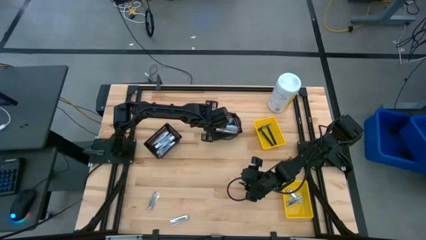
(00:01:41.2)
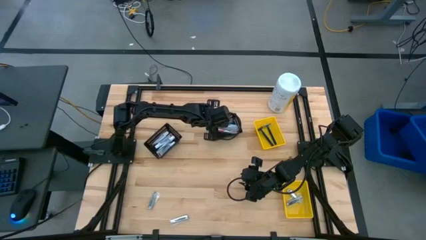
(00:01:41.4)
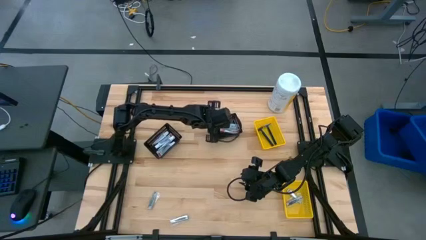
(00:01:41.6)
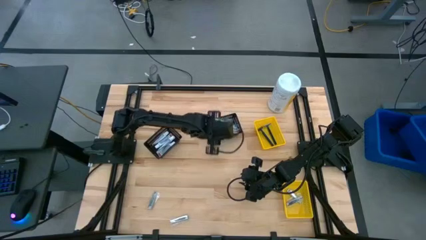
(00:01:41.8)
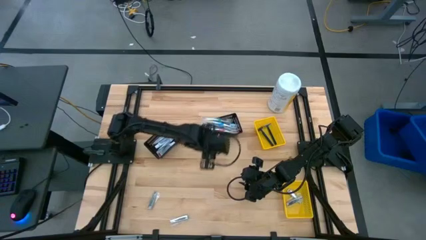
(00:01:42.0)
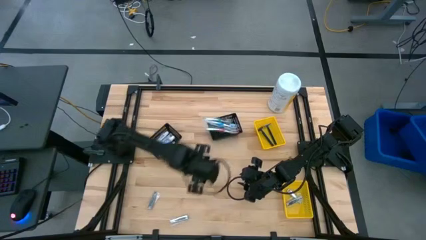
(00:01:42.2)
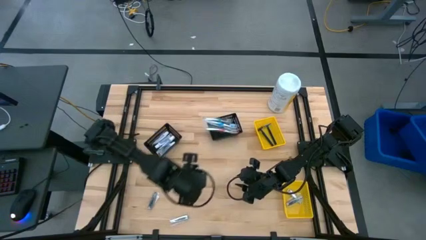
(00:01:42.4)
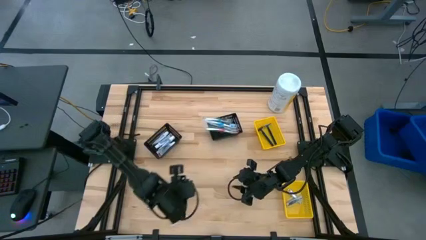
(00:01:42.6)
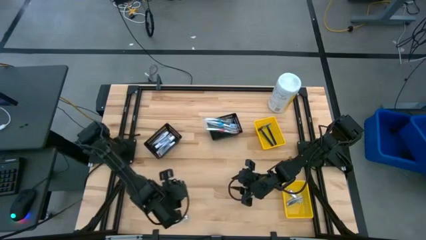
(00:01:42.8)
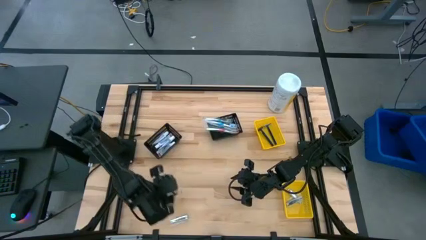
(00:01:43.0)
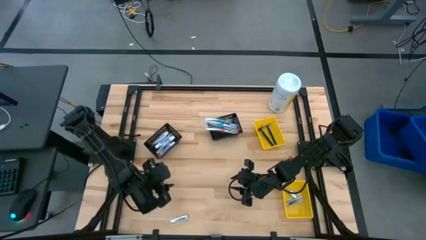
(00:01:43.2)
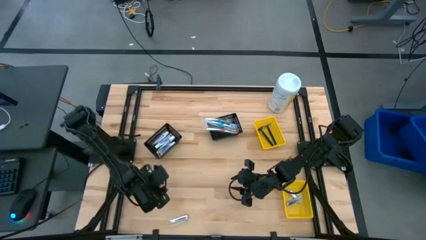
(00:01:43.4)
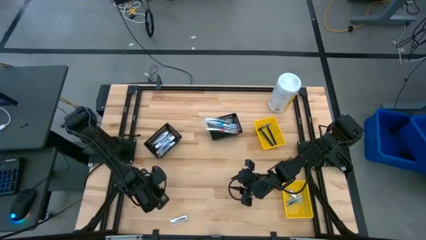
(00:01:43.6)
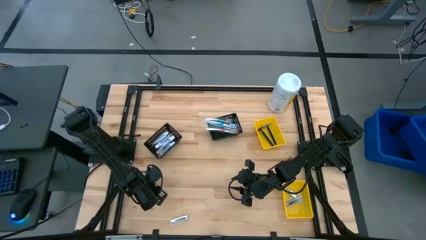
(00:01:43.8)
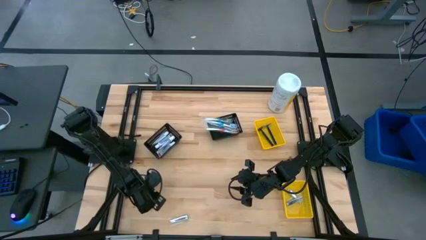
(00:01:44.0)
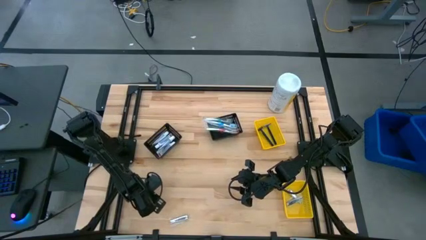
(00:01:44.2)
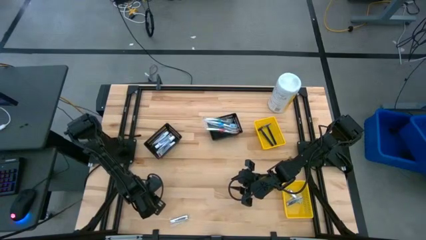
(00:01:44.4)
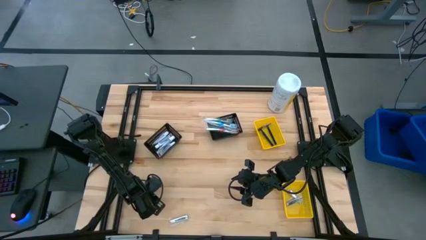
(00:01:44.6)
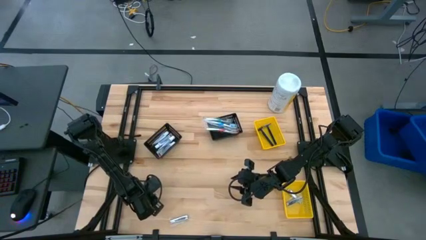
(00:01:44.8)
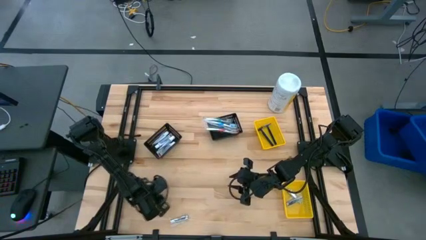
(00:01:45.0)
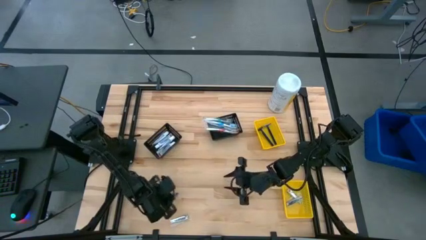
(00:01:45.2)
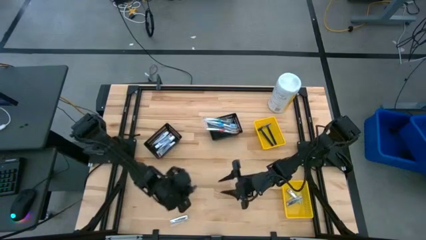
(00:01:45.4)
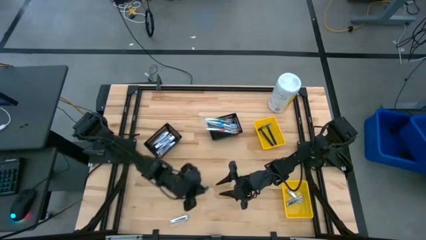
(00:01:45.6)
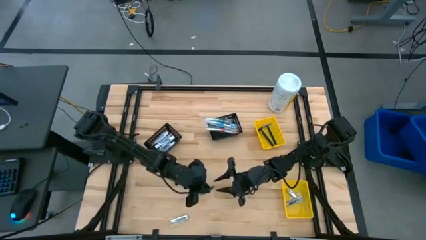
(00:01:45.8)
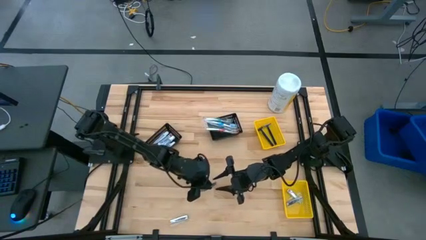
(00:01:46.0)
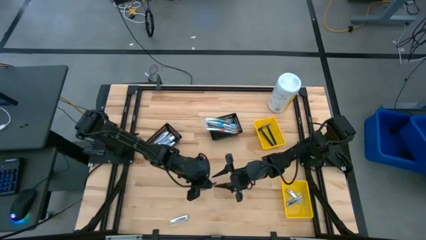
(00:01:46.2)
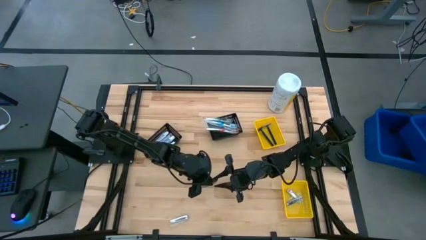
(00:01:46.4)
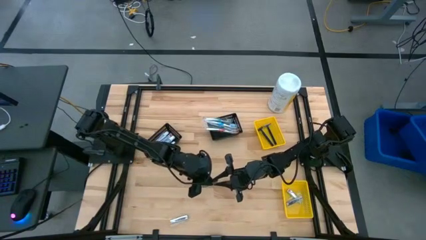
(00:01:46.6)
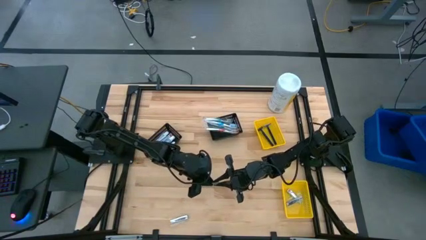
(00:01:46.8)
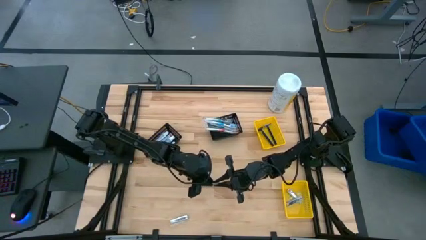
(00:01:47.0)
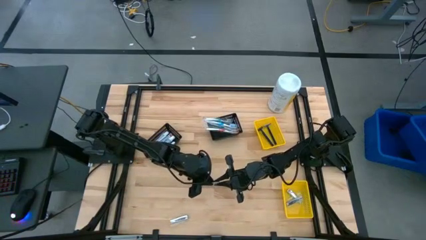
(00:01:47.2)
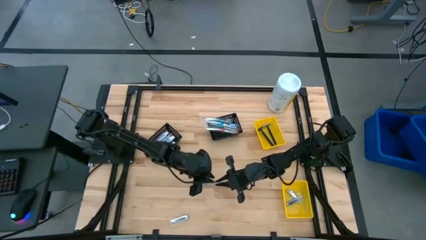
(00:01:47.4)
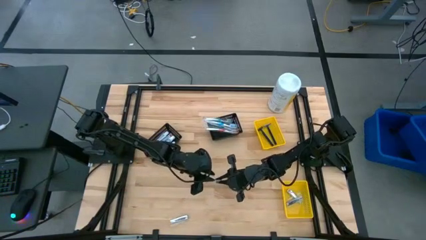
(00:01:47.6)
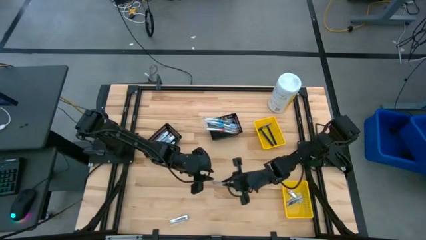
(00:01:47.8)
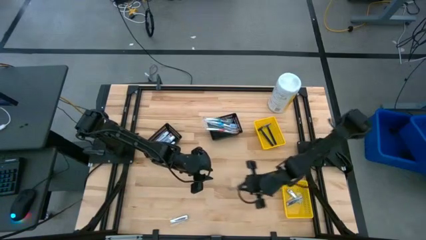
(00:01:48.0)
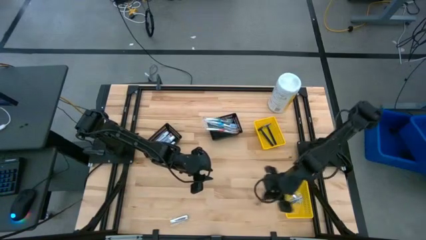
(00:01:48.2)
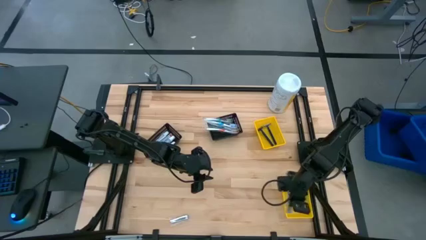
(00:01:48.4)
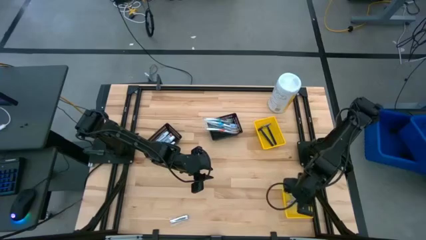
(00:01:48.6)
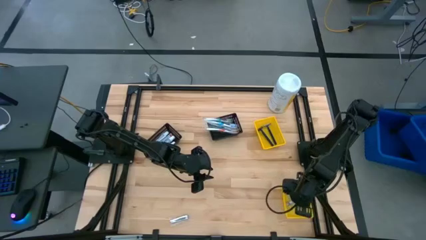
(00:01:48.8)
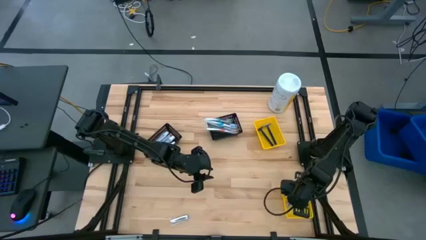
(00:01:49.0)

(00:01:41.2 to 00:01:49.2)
Task: Pick & Place Travel size toiletries
Put the silver nail cutter into the bottom yellow basket

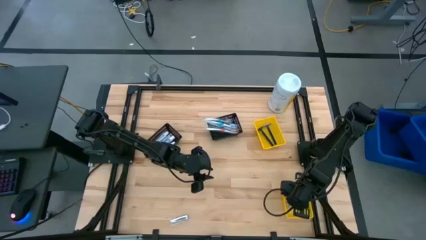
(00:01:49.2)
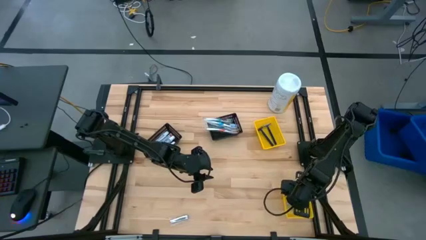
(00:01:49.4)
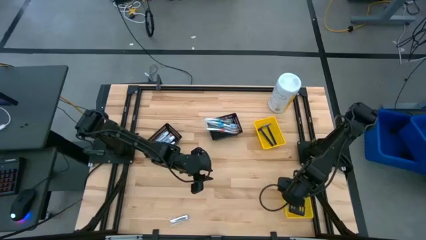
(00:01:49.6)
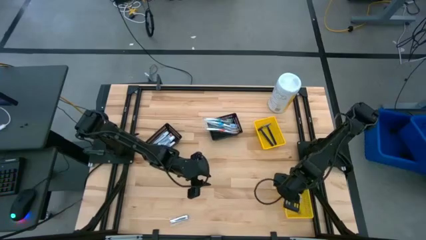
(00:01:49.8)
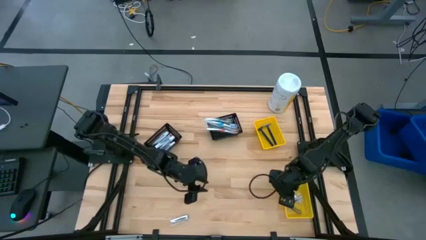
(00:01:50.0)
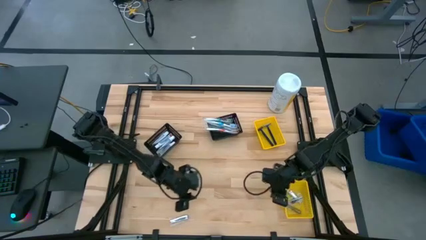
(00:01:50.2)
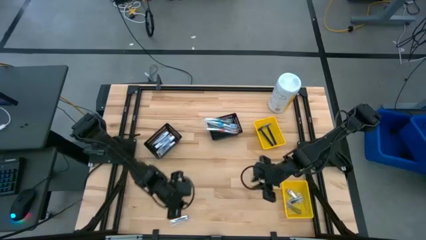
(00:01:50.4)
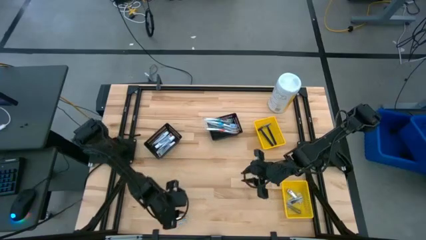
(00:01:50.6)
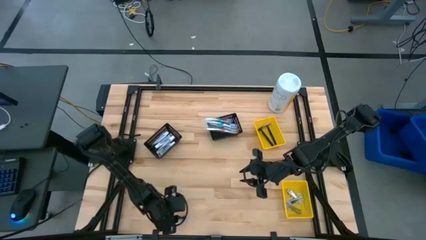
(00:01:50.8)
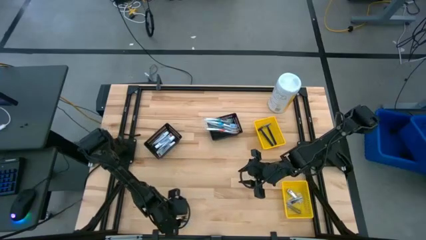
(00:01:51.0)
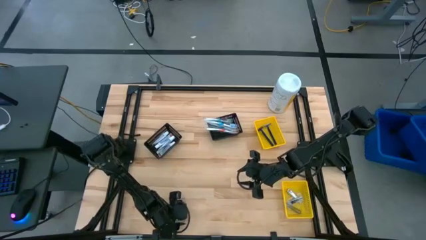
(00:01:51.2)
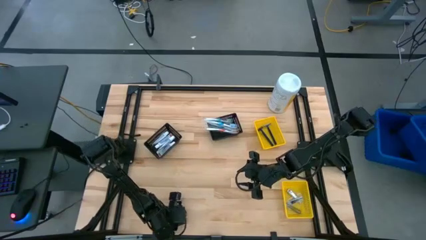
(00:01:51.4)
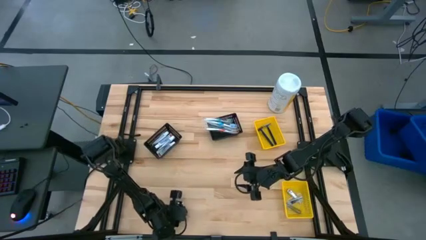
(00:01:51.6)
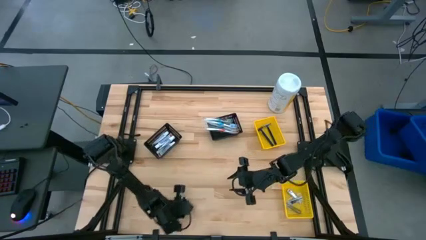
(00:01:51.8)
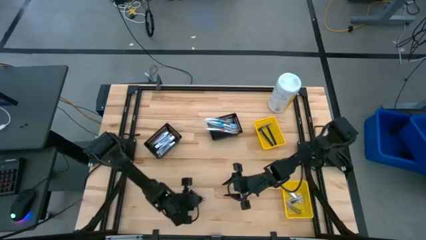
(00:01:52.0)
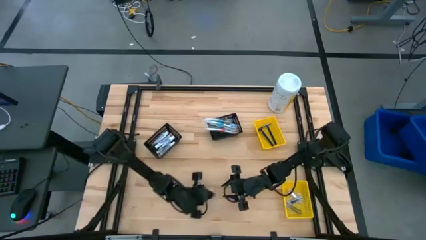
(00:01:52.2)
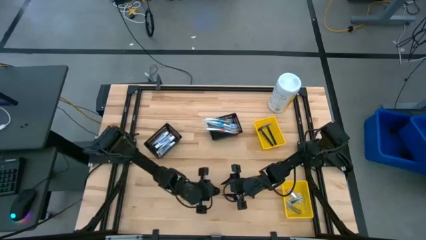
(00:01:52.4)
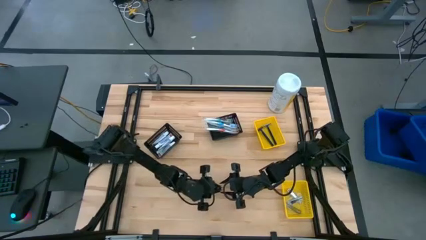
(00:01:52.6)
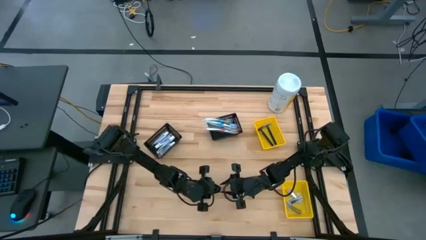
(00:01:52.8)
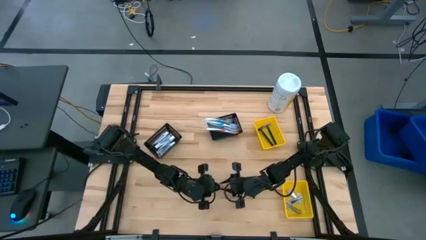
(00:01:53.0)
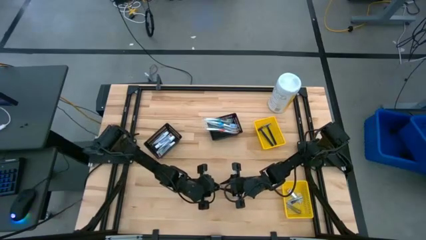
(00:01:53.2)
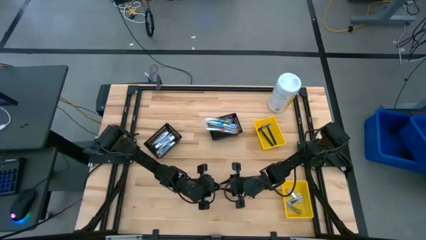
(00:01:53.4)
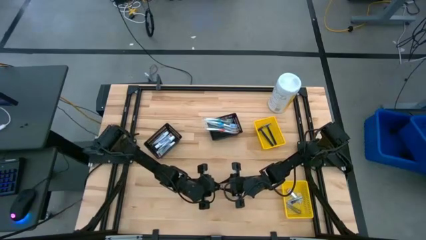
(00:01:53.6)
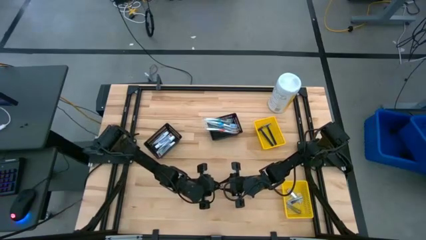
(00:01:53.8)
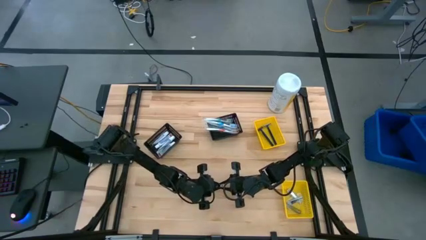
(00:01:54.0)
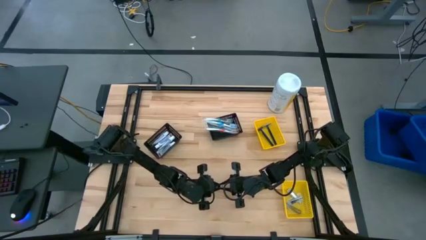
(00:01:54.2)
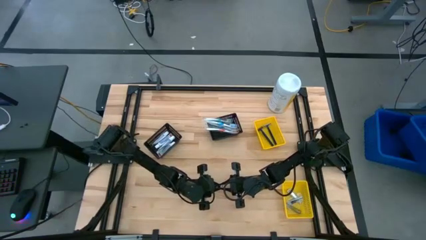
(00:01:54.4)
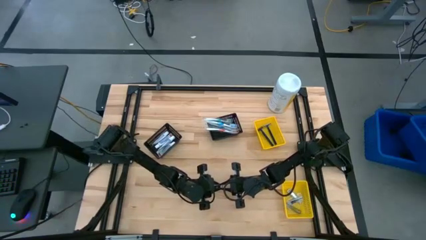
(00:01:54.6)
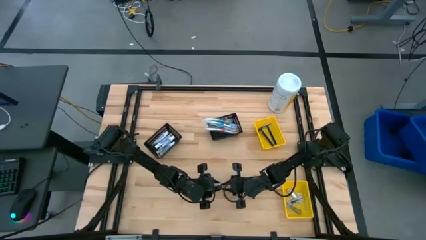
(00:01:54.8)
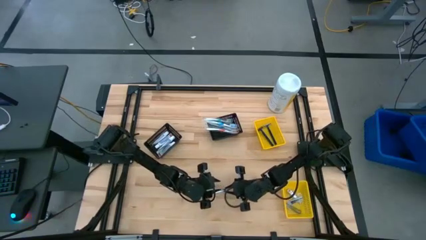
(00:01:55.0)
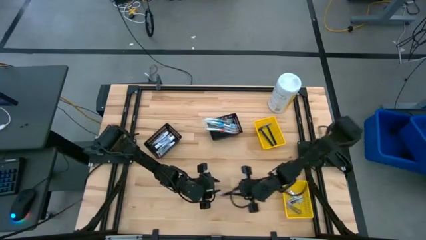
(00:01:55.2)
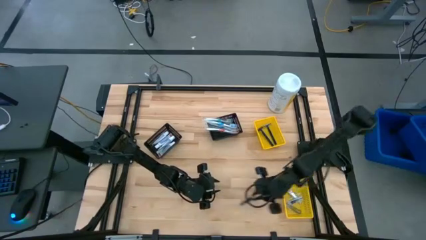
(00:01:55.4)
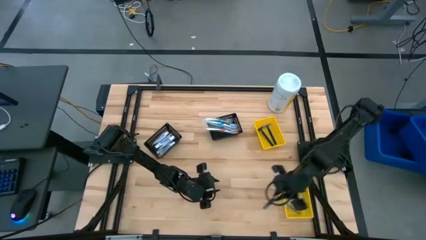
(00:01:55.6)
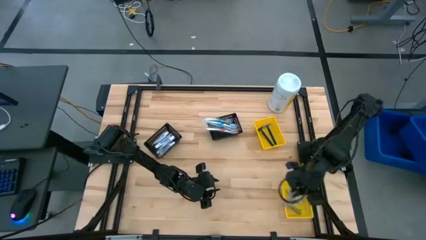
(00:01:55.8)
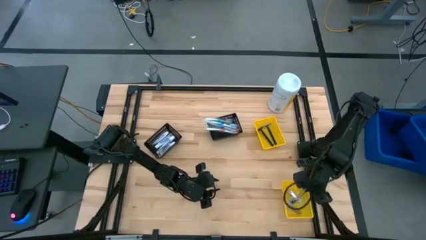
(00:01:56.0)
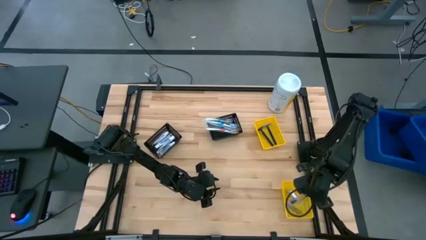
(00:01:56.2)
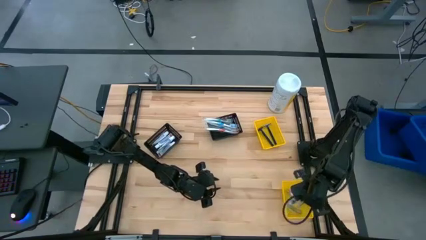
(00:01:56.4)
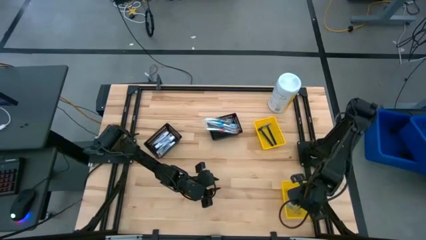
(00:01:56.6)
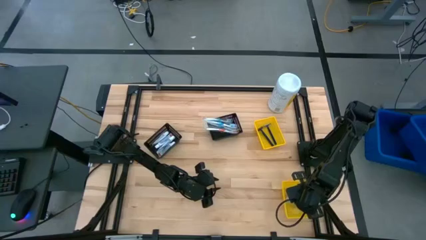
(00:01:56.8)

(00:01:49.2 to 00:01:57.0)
Put the silver nail cutter into the bottom yellow basket
